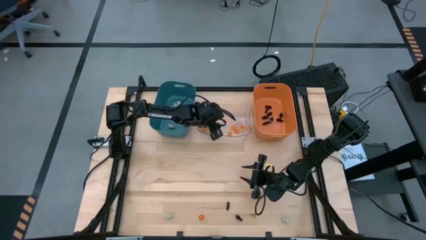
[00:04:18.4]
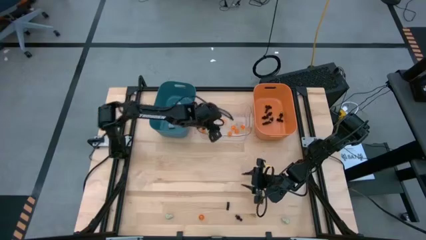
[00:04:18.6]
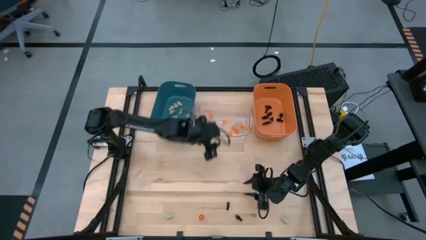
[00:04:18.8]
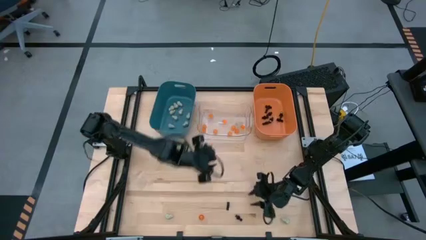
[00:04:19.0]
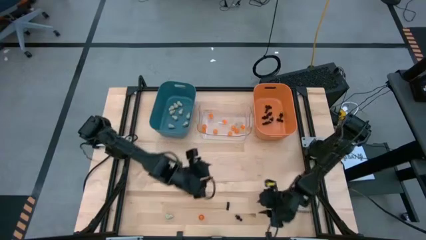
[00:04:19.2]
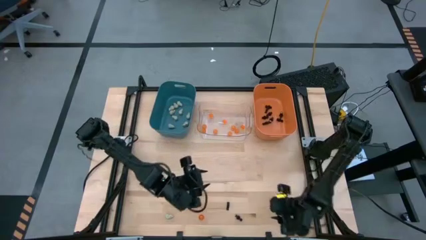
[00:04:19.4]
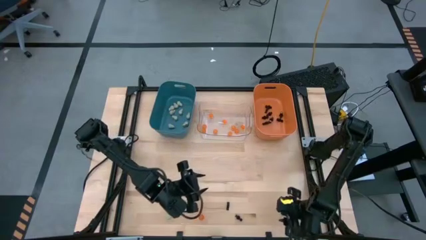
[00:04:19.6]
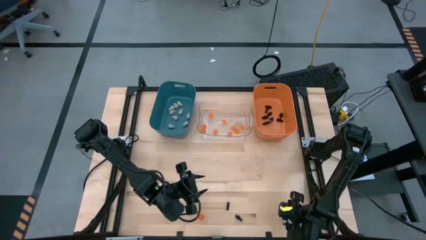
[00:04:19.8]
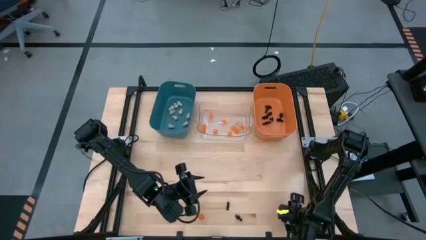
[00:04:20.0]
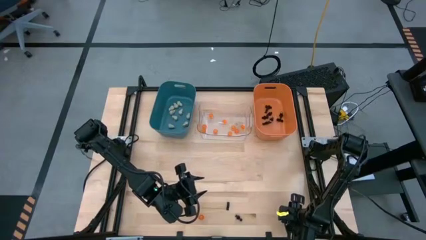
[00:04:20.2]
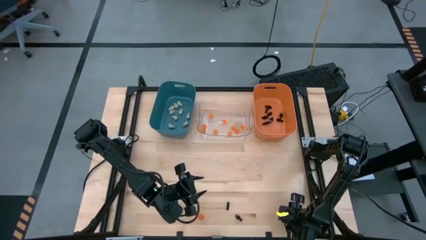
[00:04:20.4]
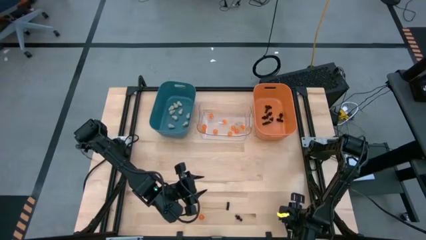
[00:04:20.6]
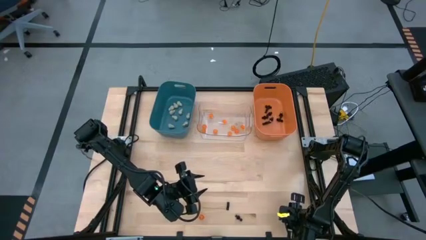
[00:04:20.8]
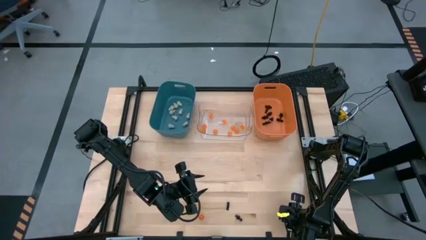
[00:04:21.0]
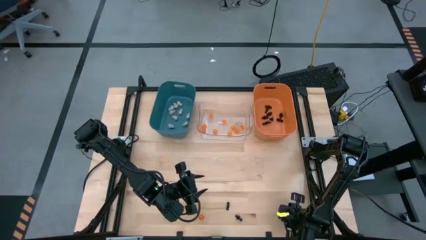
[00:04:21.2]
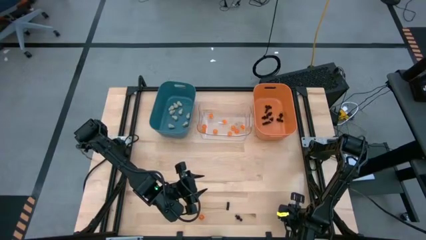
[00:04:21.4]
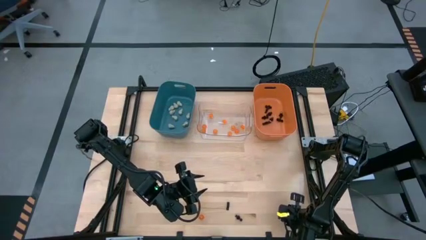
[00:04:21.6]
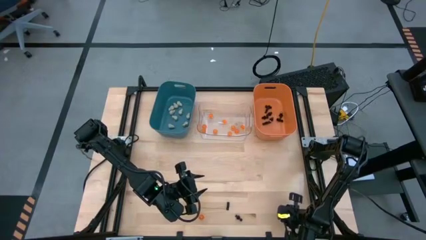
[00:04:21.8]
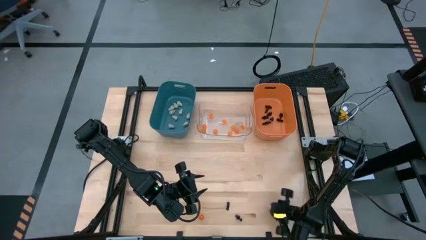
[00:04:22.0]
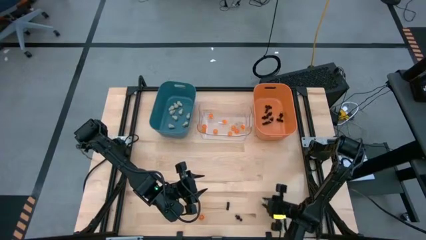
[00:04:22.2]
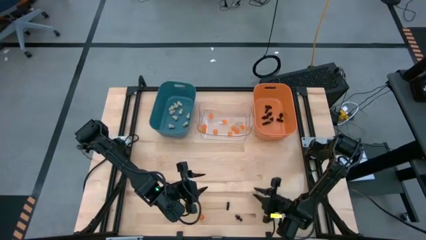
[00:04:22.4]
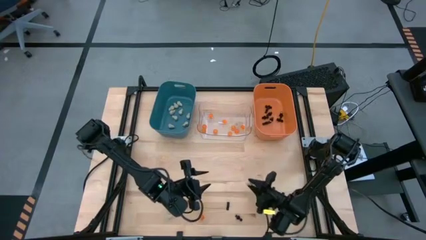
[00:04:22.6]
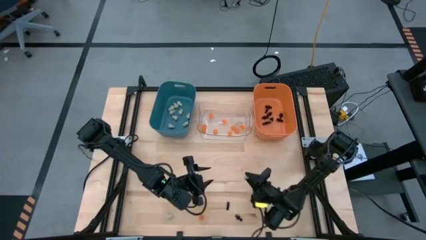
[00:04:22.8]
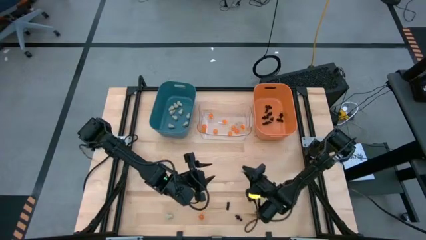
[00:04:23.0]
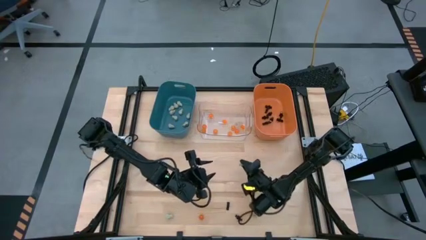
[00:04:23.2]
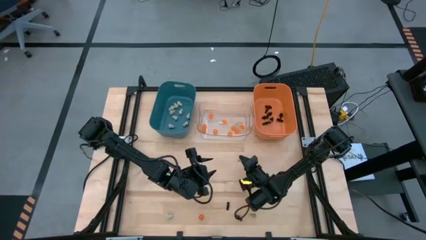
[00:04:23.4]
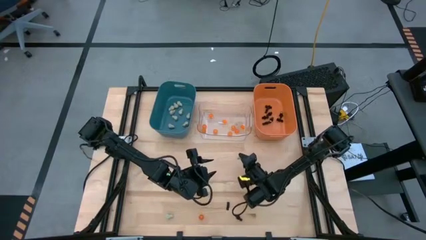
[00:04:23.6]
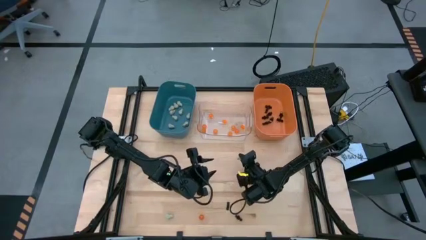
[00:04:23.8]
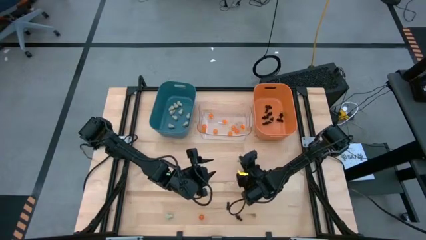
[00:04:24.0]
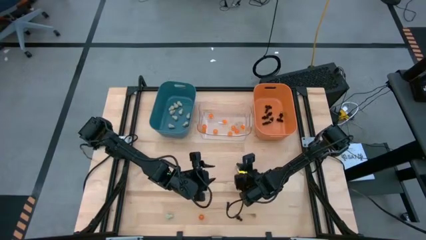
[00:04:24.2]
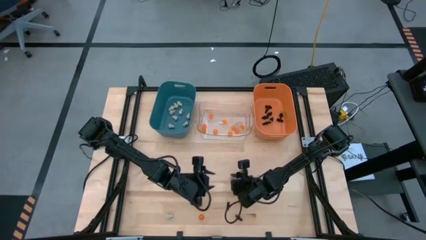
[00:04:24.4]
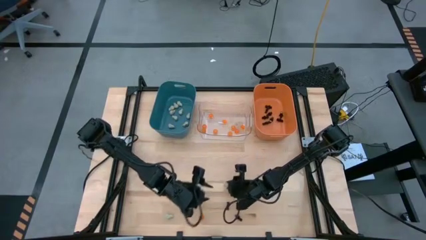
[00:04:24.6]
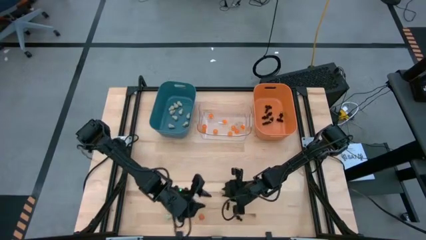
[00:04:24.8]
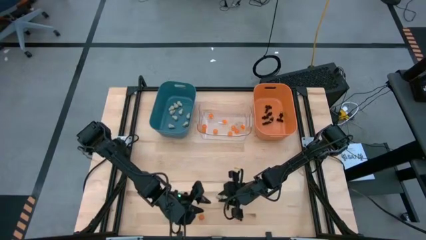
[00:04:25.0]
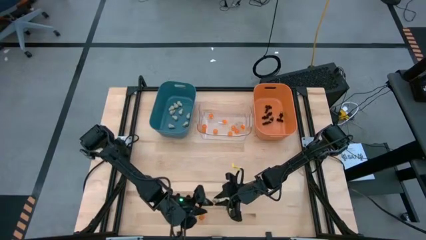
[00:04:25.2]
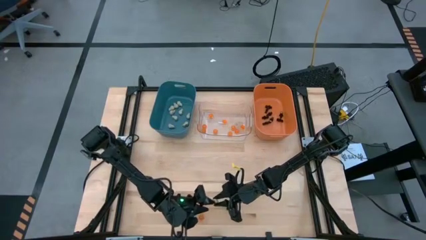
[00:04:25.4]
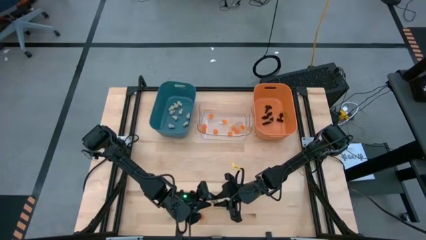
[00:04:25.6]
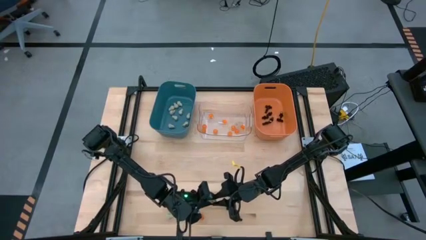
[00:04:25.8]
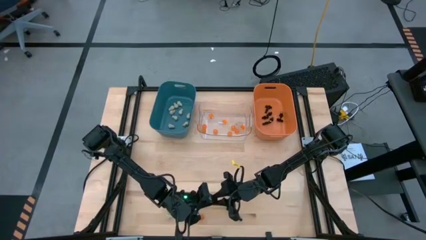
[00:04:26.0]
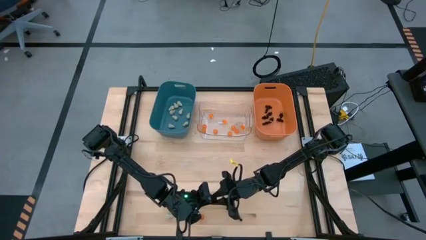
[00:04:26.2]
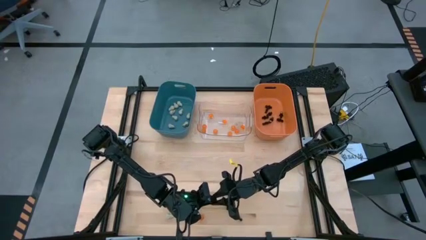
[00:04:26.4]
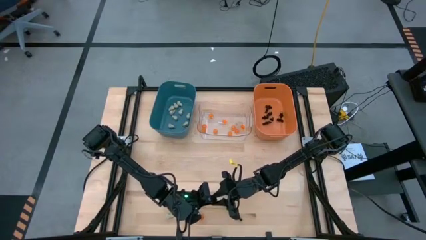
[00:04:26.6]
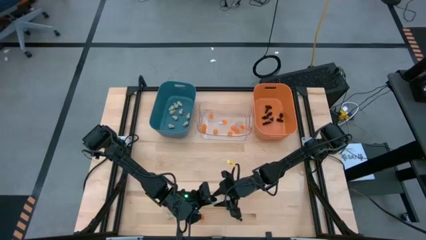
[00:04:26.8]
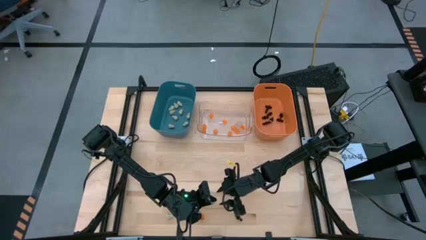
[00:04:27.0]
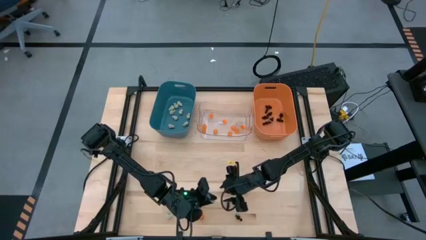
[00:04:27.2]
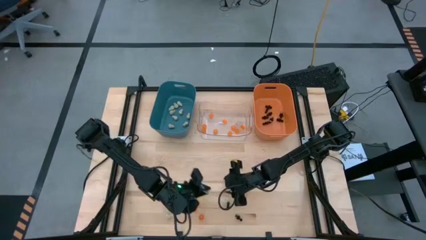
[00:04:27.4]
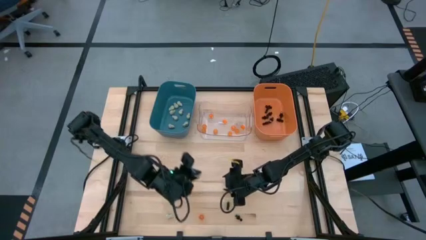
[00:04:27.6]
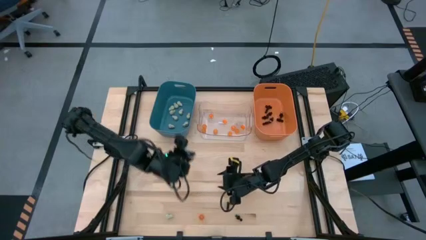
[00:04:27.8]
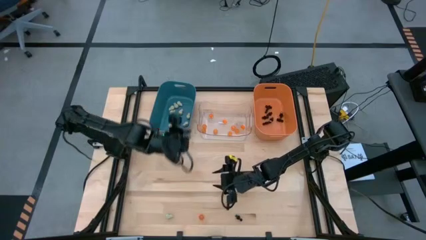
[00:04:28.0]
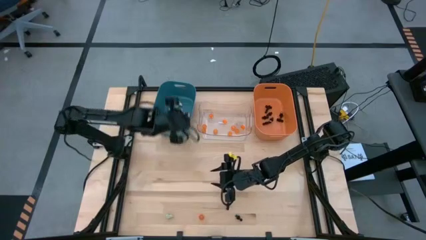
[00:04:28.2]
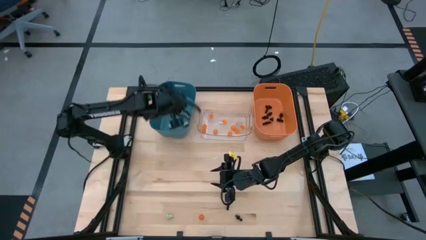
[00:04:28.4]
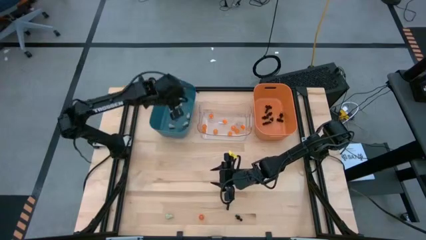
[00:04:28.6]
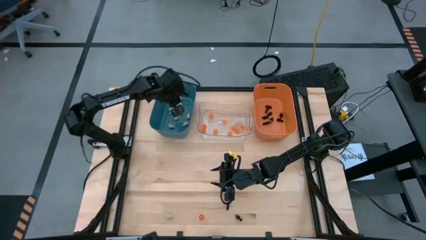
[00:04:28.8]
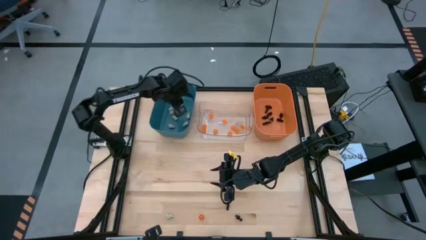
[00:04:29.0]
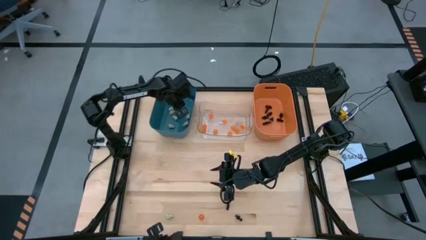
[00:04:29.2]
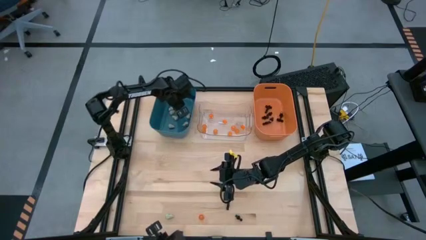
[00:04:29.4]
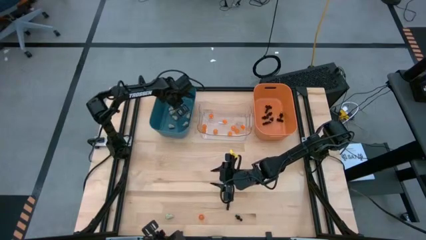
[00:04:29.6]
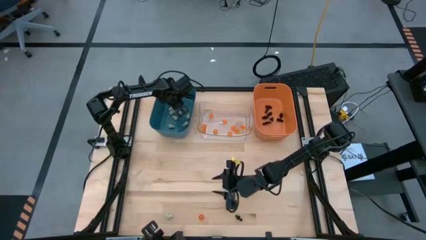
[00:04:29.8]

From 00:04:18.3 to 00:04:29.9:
Task: Sort Halloween decoration
Put the white skull toy into the blue bin

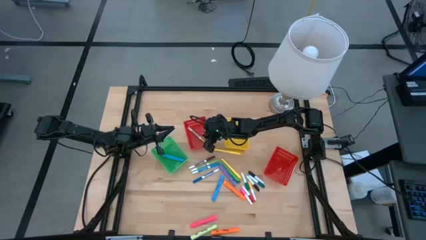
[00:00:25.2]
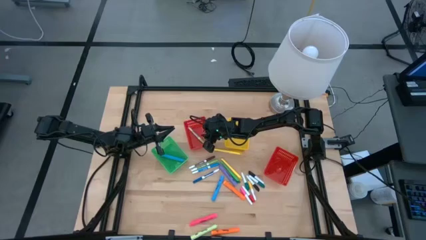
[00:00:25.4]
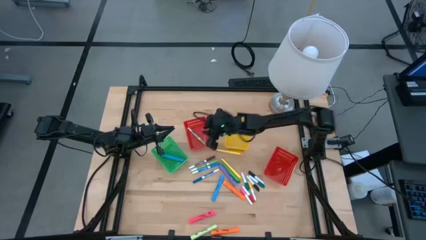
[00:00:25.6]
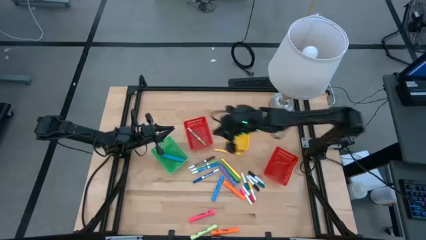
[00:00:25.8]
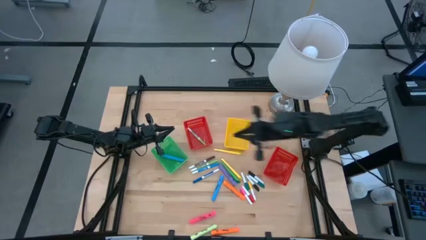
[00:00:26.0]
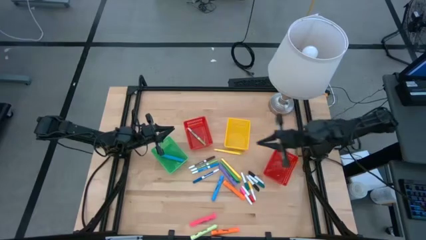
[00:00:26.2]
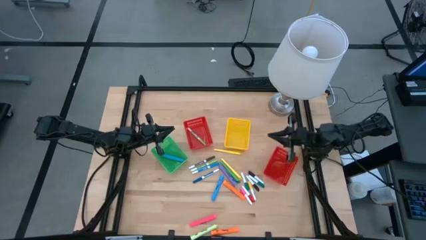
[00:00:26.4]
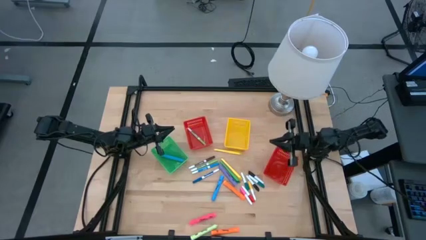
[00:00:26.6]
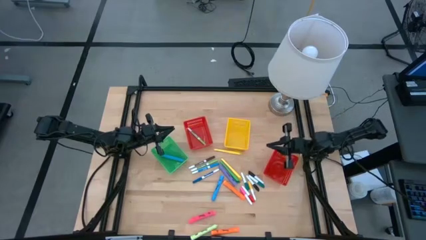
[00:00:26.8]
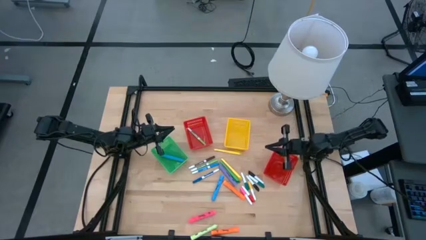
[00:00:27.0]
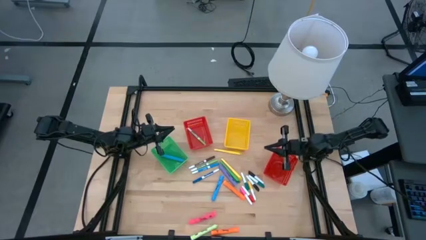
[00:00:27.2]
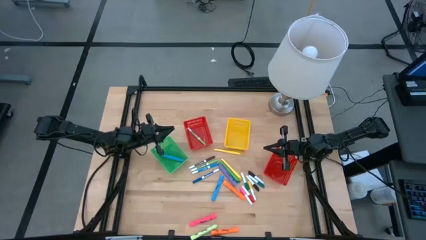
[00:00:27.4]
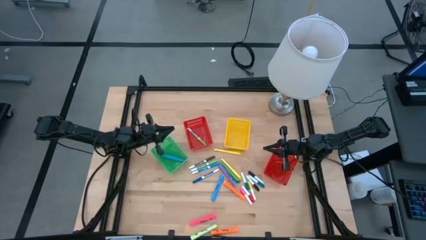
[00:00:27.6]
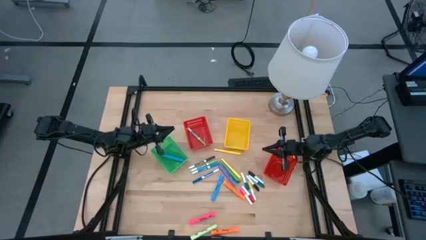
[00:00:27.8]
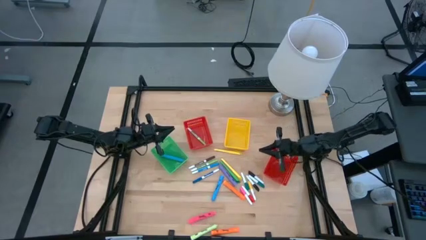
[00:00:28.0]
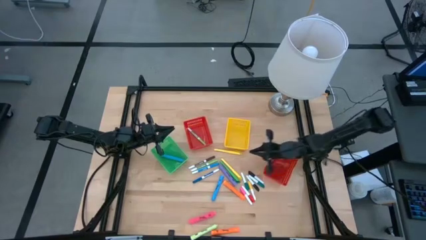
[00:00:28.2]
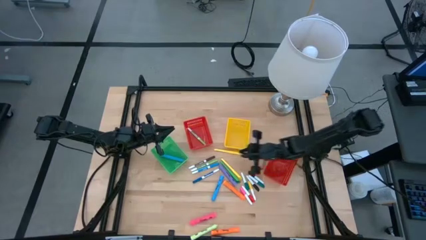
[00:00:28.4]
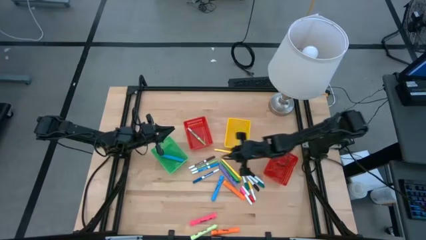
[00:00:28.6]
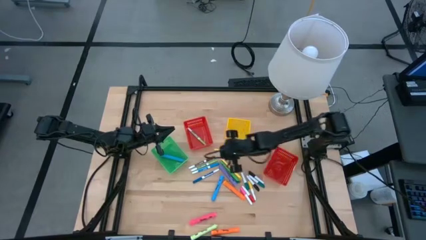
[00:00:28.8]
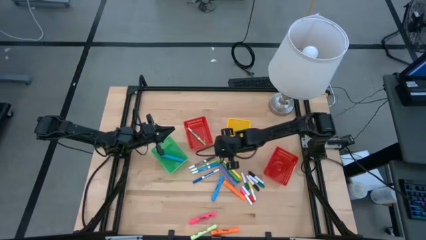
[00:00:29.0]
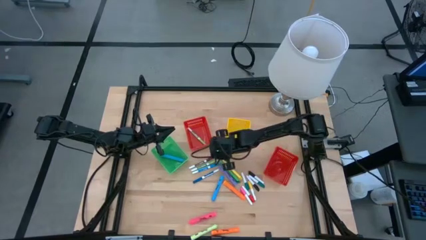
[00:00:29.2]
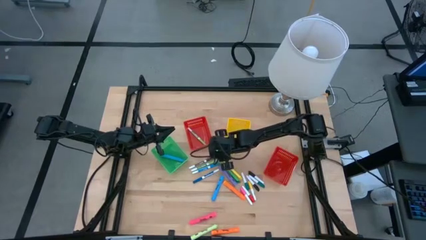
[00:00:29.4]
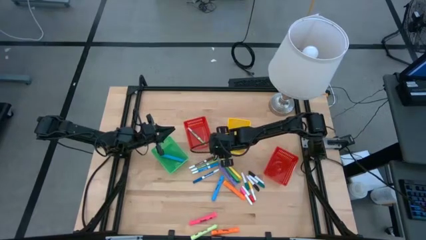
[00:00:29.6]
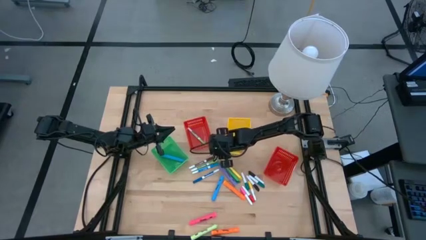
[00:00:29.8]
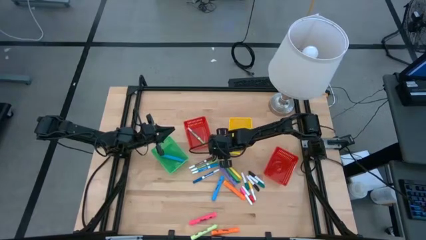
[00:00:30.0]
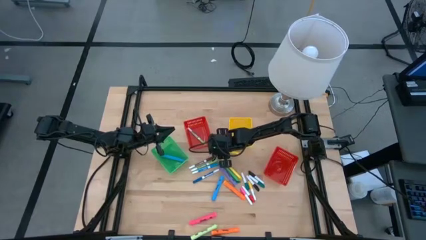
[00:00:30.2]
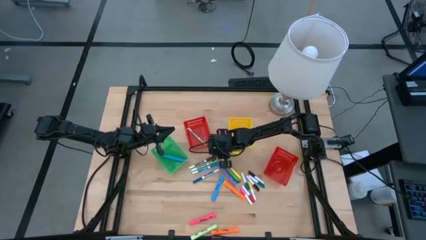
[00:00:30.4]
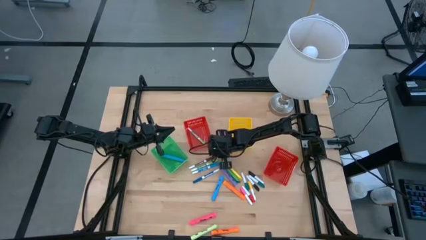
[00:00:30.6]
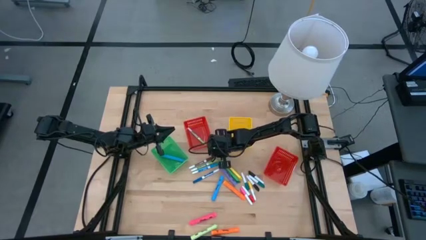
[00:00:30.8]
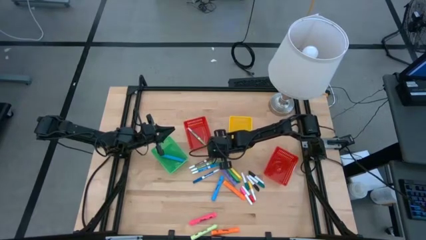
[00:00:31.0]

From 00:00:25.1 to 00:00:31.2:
Task: Pick & Place Markers
Put the top yellow pen into the yellow bin
